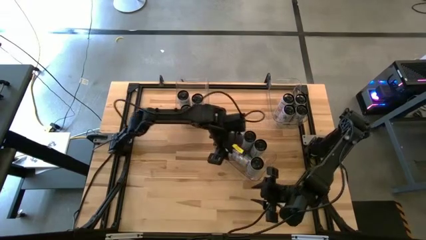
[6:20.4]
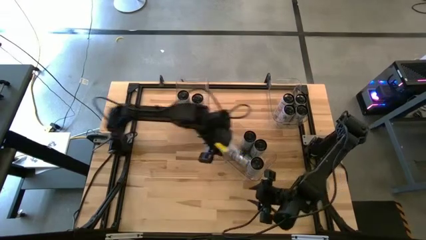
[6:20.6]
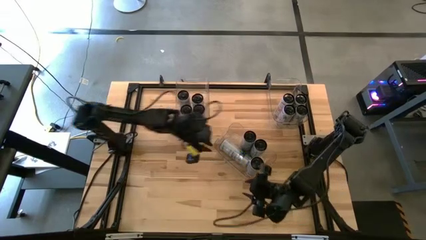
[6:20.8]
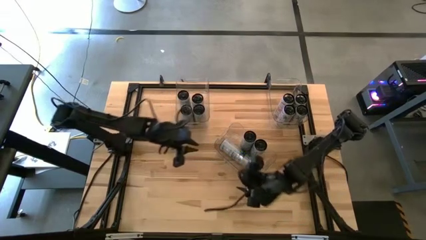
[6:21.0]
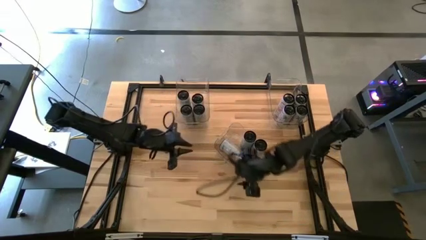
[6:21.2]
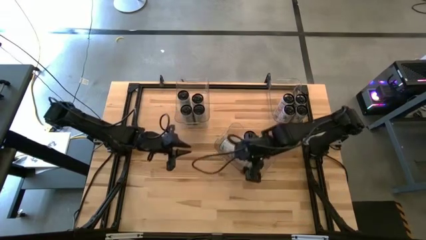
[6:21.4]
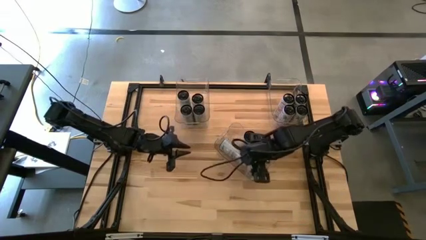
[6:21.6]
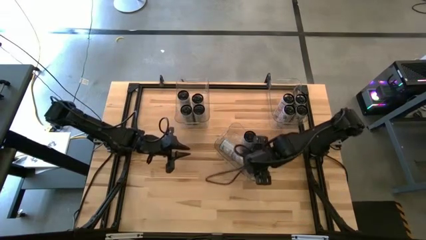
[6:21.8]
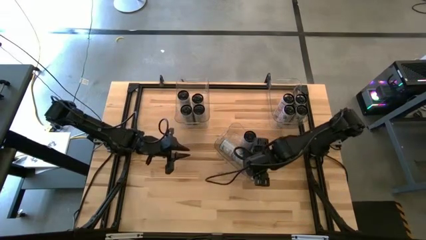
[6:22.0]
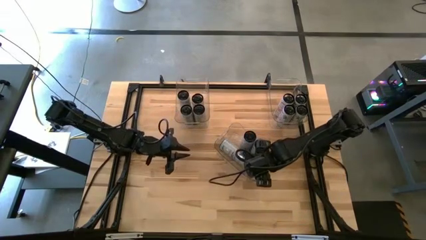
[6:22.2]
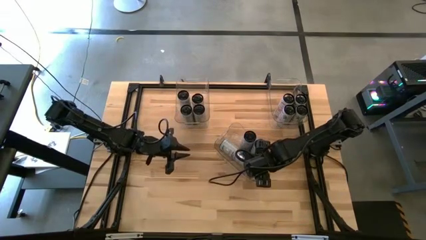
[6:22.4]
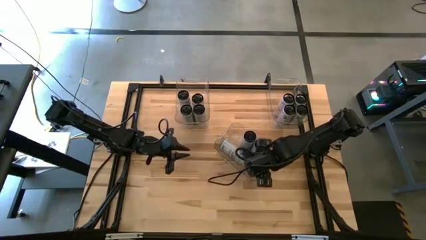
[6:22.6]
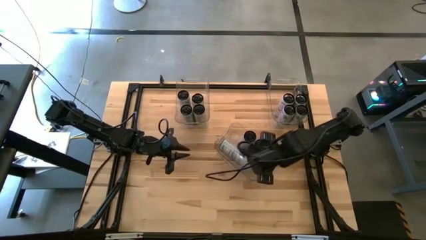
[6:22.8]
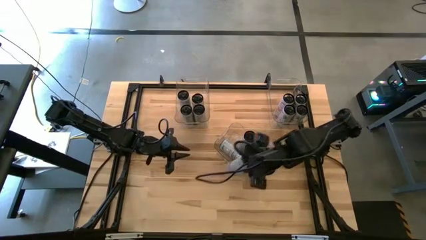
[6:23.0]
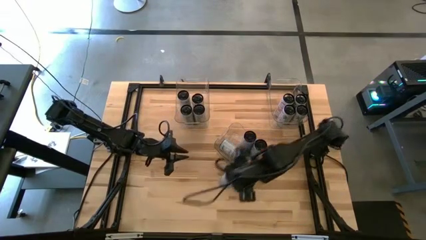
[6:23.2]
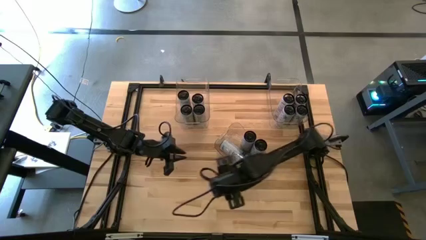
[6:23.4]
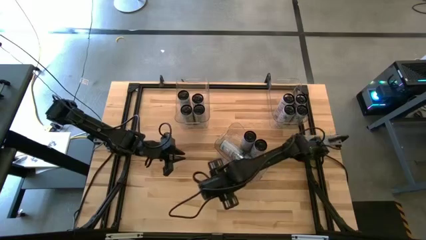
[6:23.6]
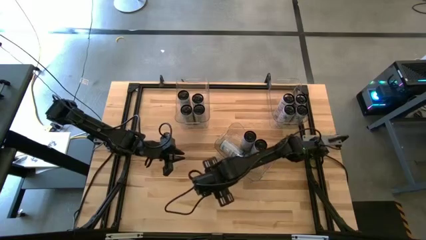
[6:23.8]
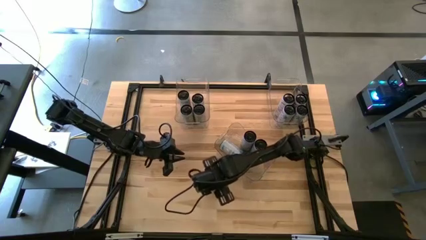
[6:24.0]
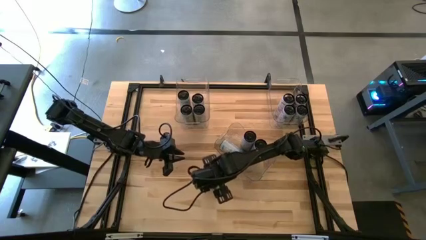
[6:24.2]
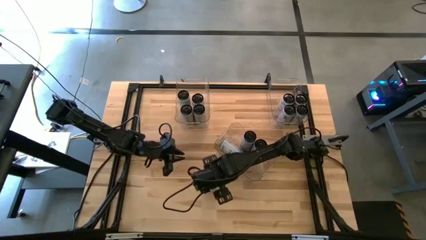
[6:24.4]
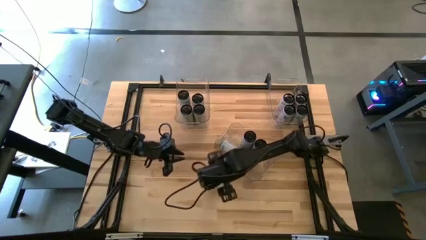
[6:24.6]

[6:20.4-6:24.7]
Task: Sort soda cans
Remove the white/blue soda can from the transparent bin

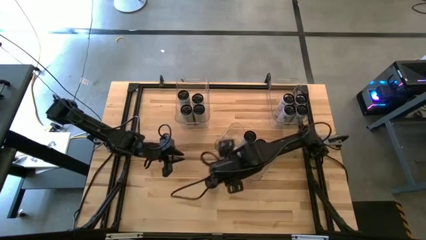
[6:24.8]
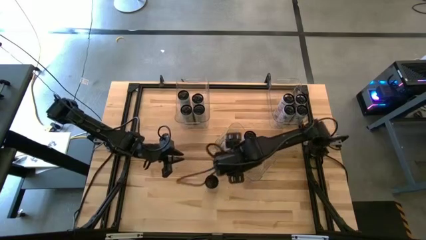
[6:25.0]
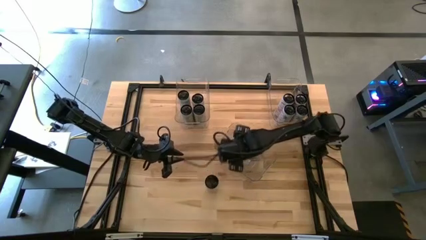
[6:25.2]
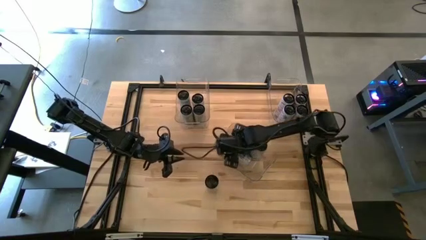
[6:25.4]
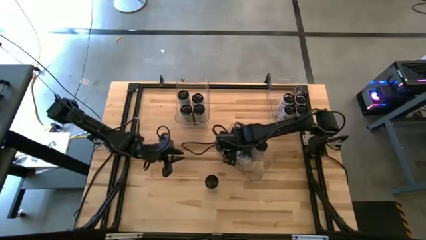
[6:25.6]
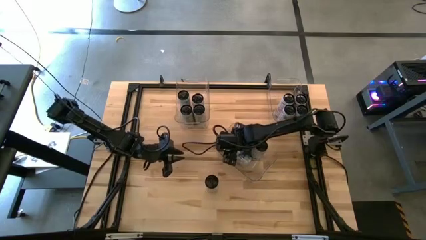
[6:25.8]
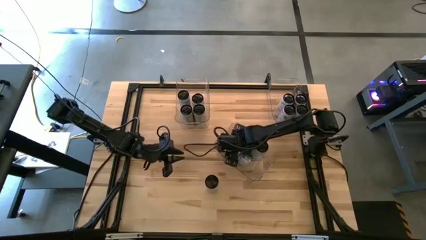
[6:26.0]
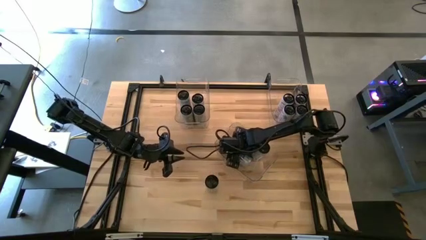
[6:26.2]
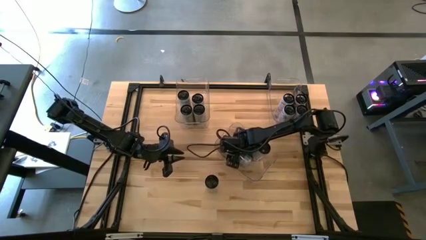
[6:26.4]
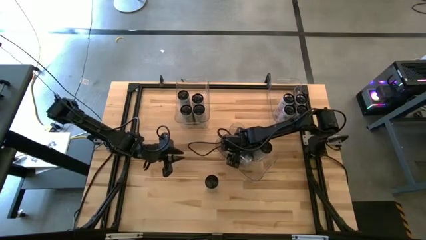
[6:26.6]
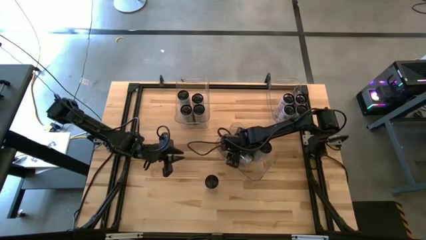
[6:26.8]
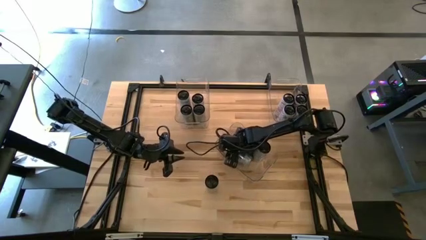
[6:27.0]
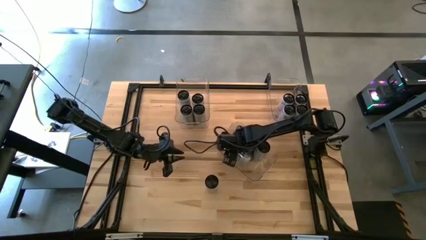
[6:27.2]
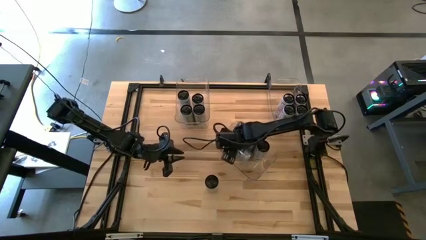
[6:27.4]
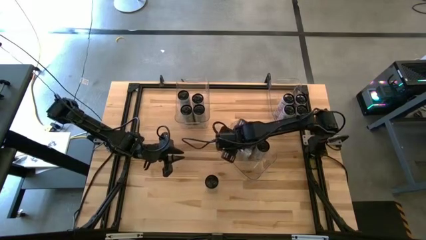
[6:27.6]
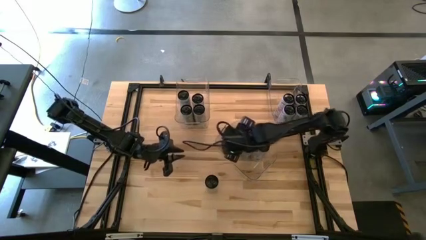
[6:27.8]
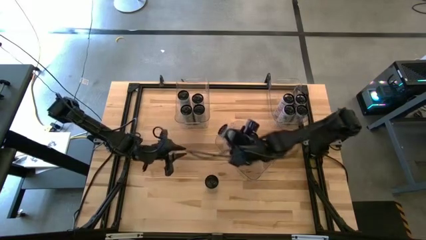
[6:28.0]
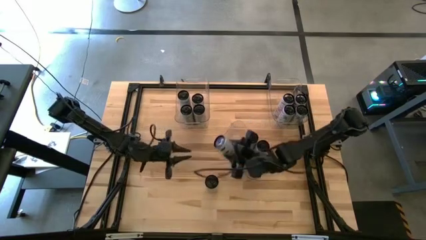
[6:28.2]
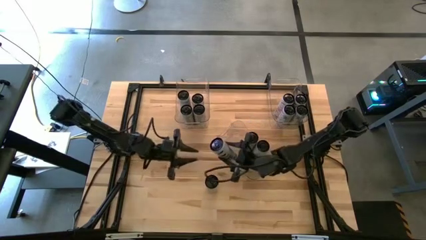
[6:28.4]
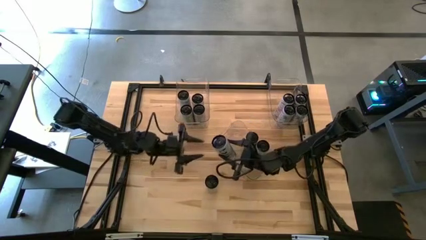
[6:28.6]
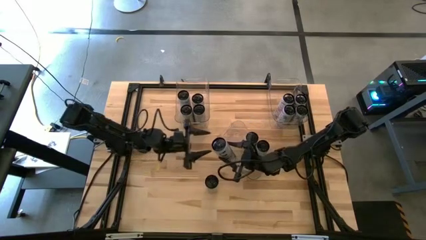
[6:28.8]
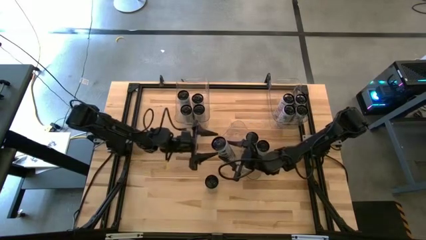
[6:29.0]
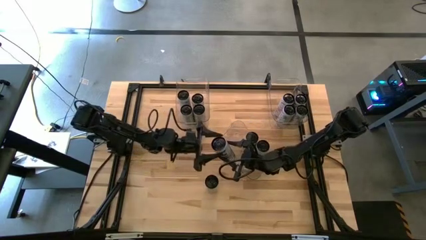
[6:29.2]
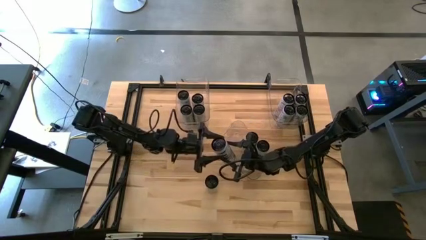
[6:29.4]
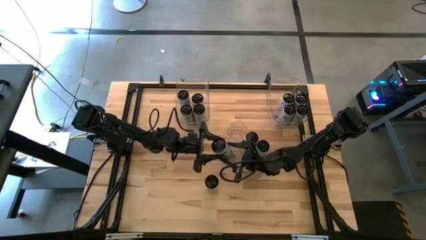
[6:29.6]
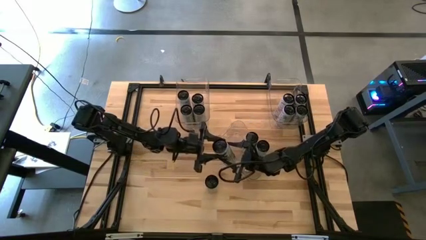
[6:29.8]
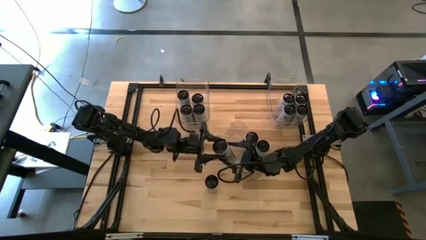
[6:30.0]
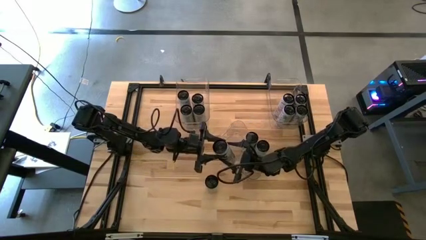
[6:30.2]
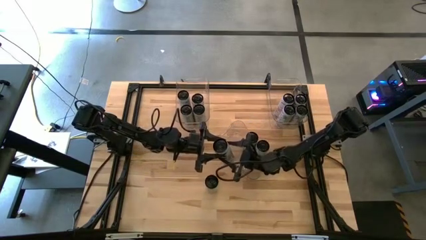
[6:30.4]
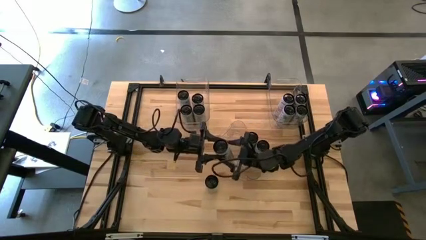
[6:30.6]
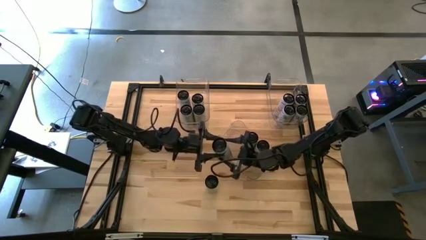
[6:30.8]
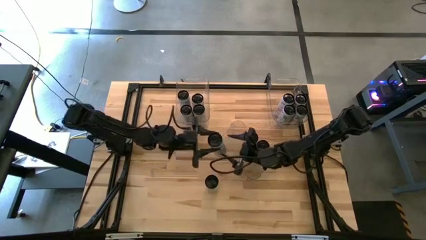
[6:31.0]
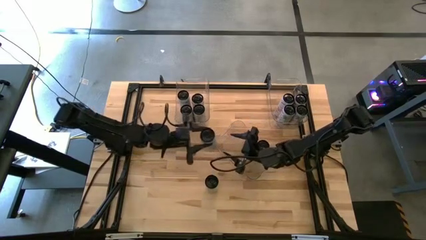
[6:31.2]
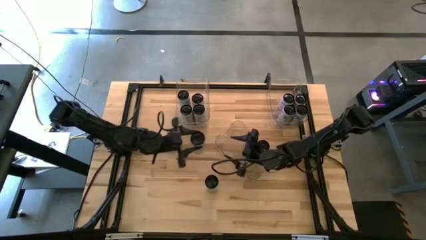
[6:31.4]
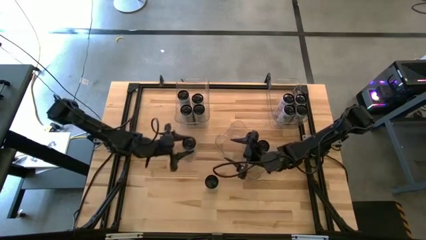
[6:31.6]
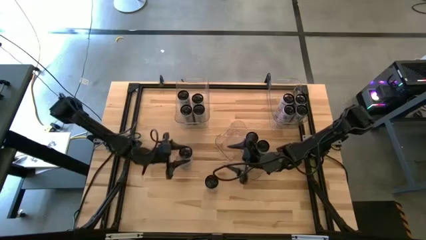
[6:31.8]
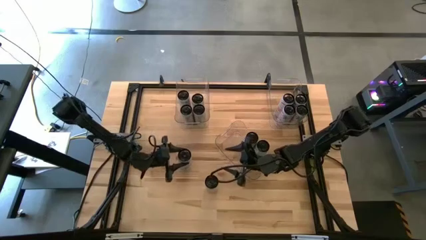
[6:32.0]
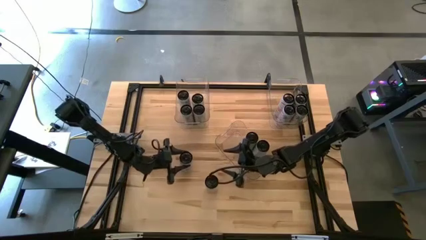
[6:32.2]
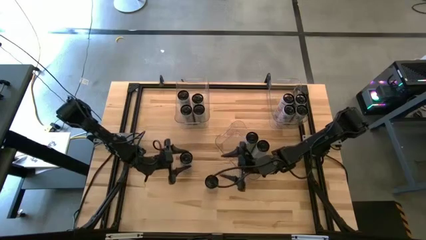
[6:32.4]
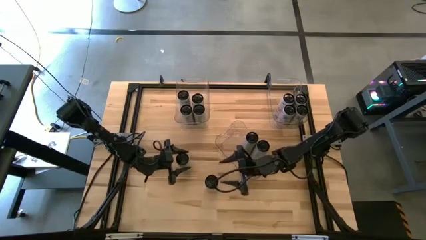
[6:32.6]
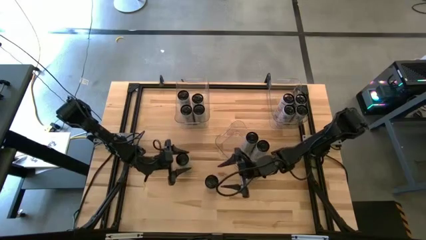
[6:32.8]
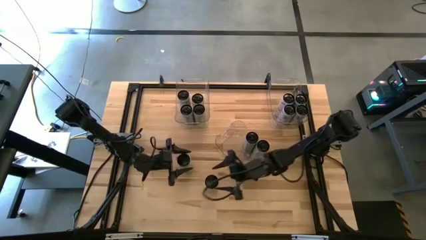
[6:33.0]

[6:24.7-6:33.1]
Remove the white/blue soda can from the transparent bin

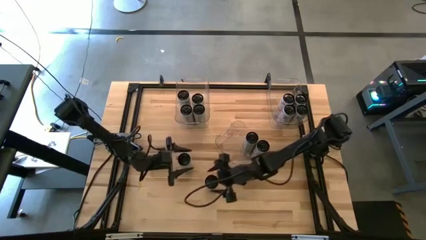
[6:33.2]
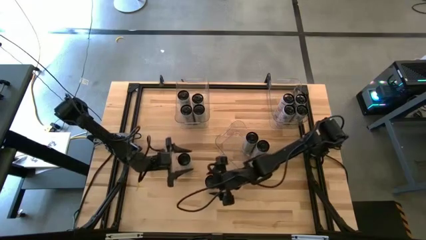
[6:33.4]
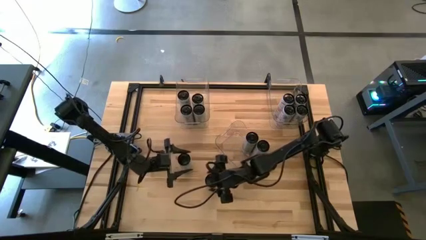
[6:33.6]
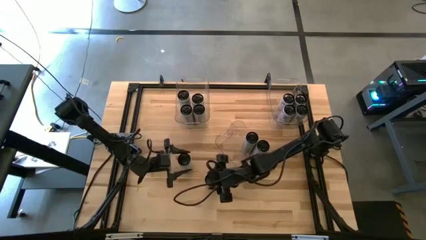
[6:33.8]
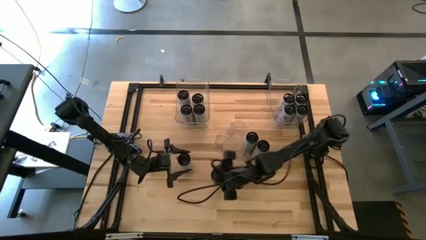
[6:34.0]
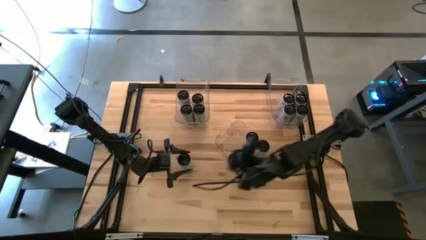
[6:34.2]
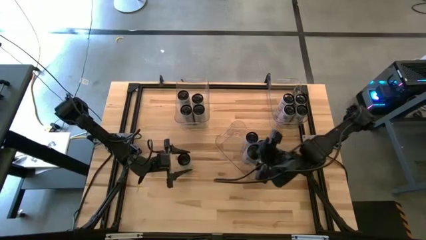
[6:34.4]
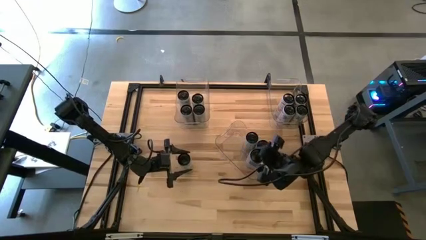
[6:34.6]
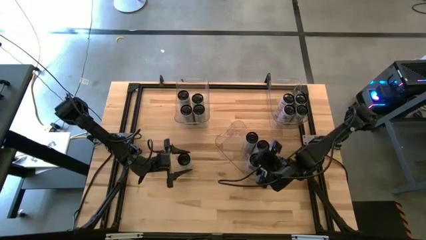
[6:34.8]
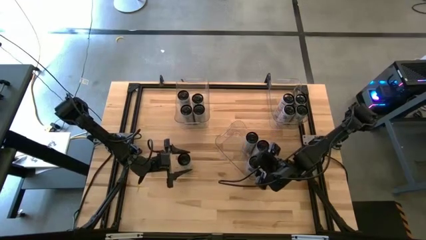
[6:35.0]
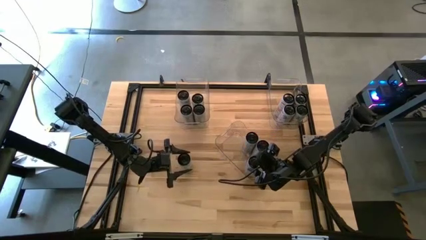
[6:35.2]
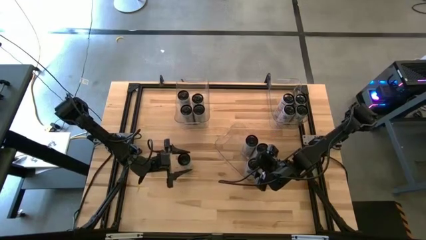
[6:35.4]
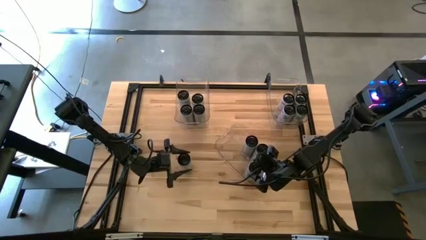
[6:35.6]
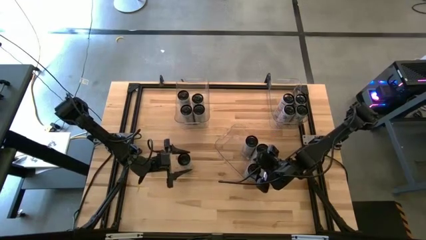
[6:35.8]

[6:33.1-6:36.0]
Put the white/blue soda can into the bottom center transparent bin
